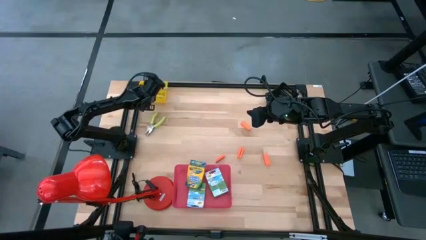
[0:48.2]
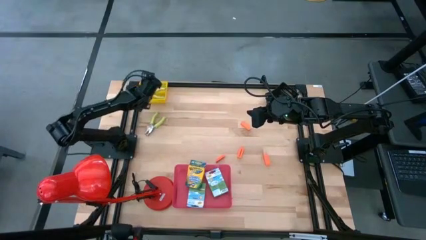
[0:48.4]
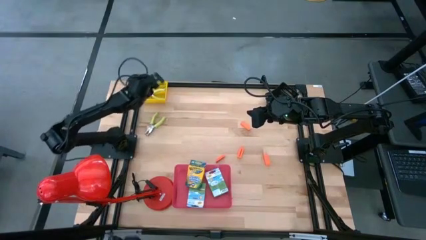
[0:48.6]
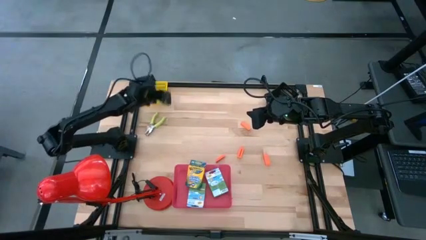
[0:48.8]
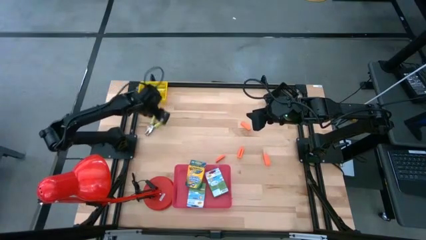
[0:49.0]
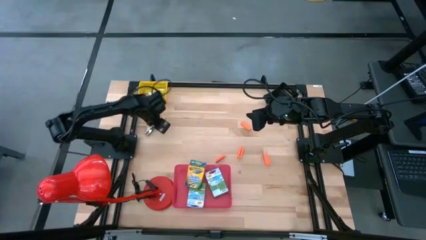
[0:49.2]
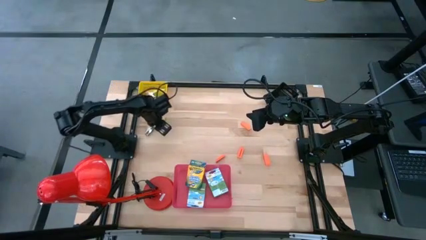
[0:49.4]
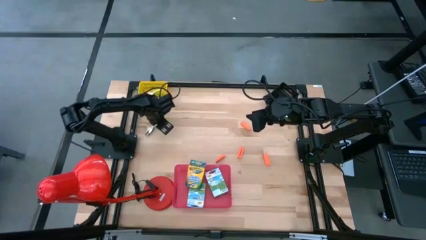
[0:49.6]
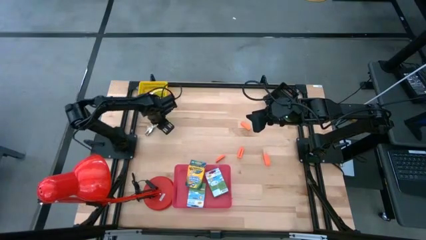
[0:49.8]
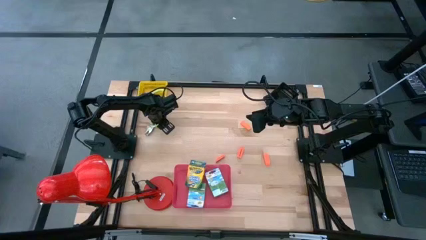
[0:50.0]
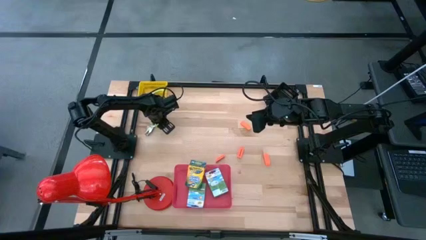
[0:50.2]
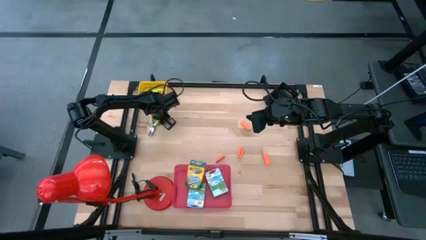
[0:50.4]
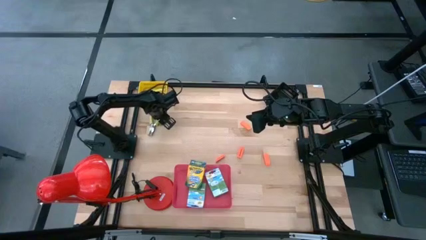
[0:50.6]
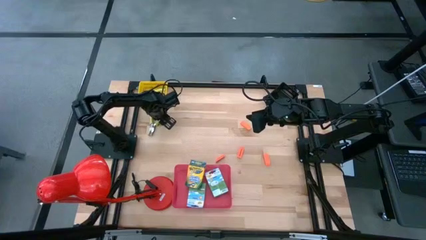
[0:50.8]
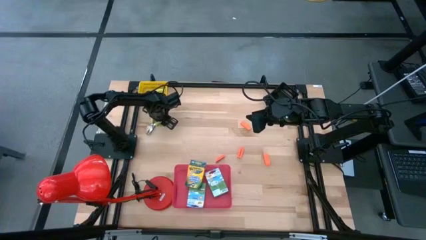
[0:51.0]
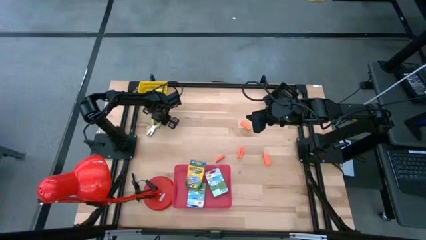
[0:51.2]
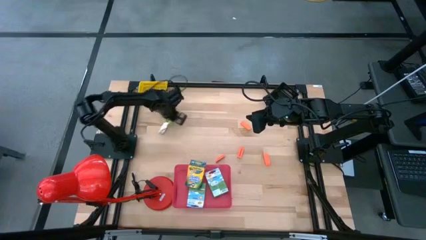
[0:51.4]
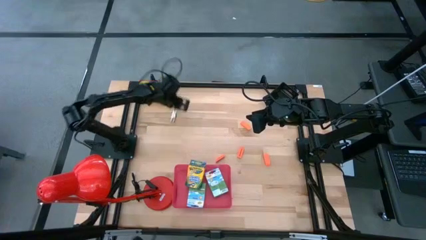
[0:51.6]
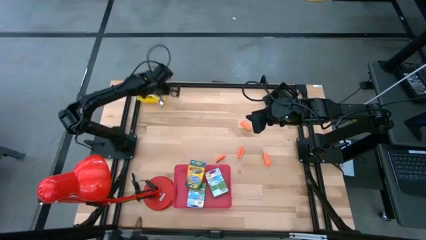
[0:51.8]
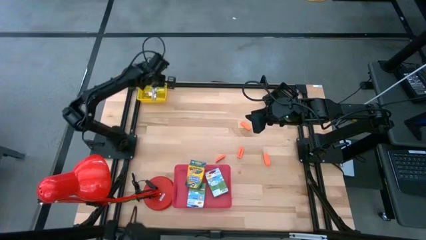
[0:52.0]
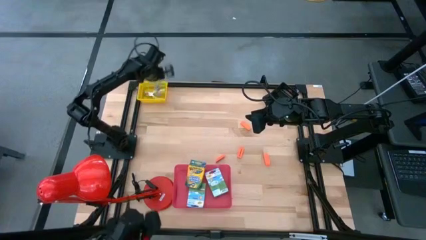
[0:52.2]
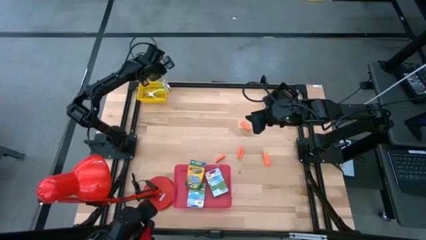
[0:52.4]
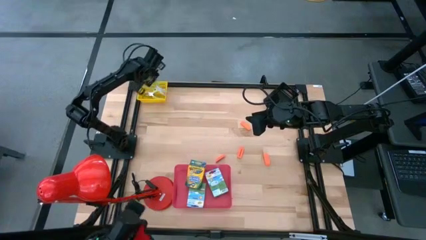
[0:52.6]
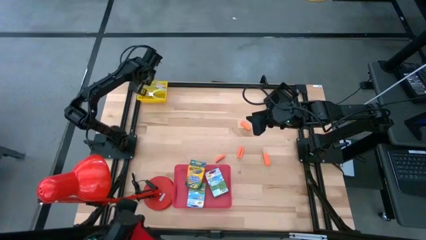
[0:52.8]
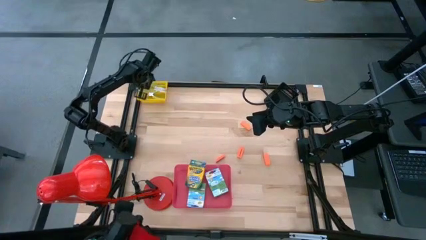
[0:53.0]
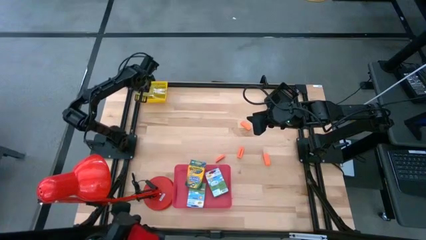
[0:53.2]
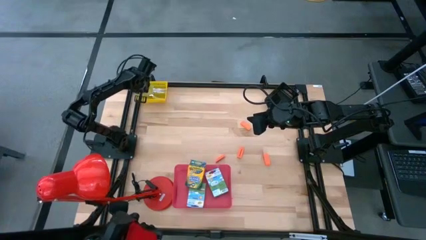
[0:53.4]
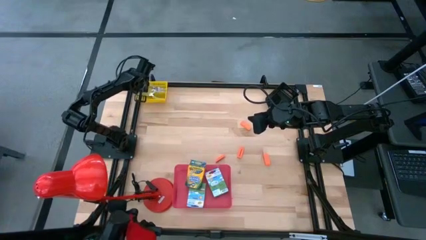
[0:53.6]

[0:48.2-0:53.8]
Task: Pick & Place School Supplies
Put the green puncher into the yellow bin

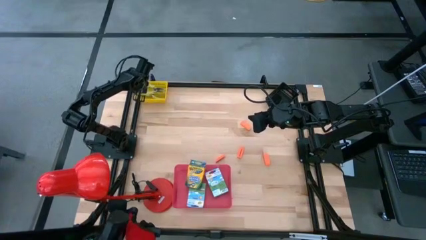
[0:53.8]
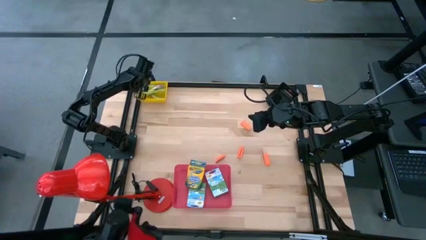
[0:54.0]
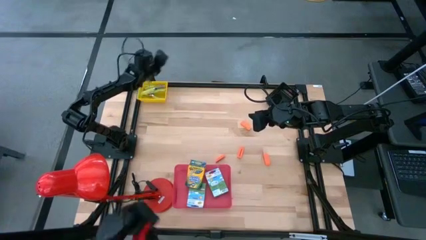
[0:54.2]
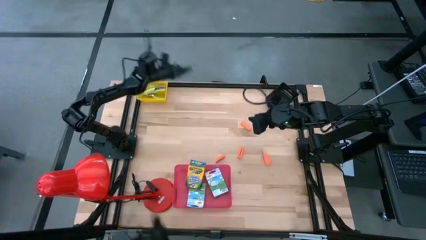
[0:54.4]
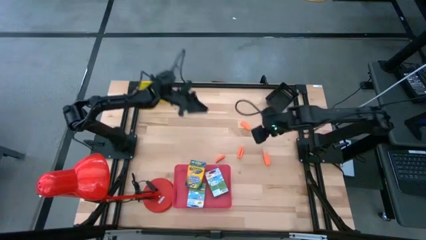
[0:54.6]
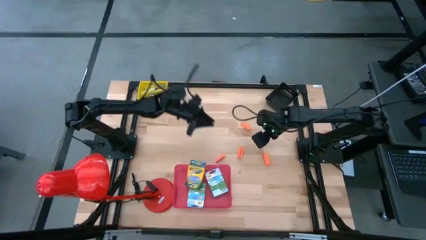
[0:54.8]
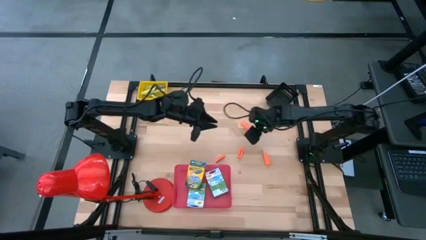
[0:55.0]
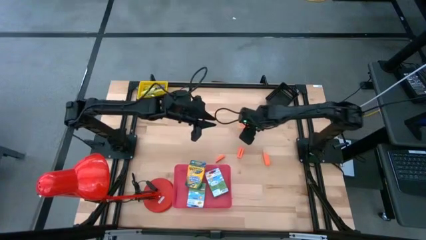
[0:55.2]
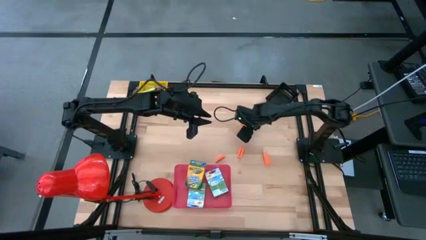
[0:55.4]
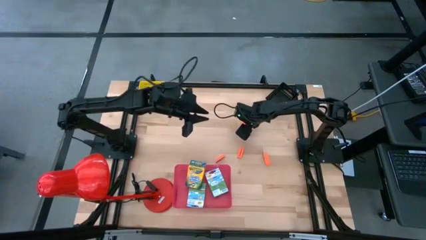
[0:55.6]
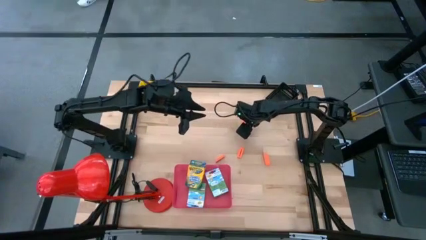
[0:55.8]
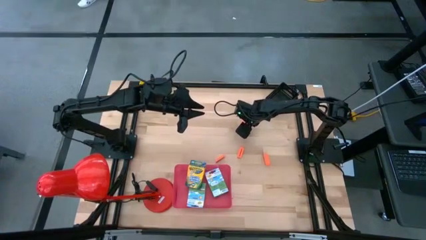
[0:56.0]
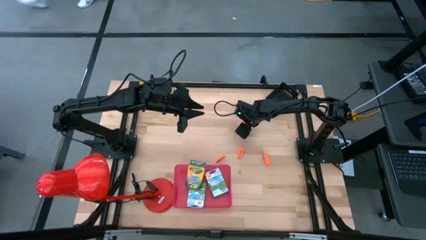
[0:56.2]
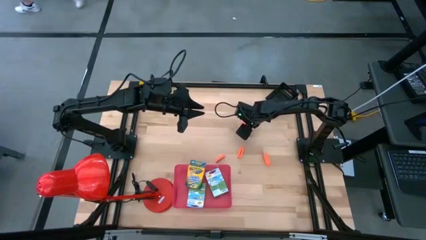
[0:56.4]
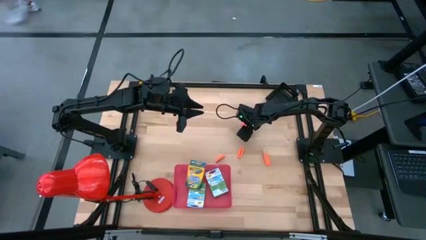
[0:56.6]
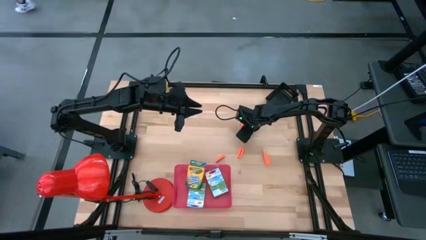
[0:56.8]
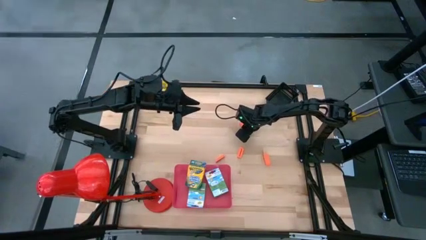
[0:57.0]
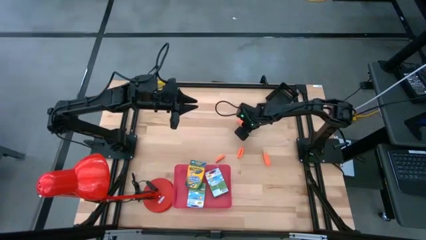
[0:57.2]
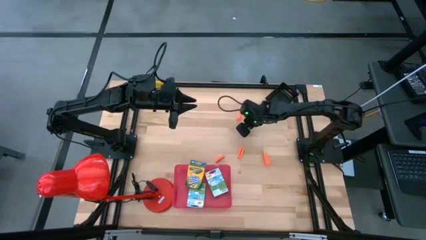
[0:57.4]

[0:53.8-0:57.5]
Put the orange eraser into the black bin

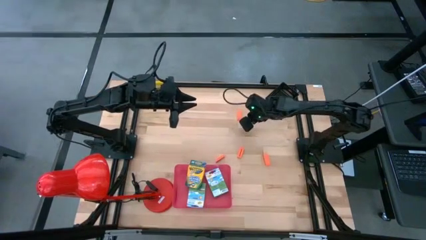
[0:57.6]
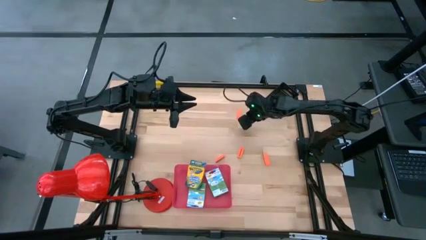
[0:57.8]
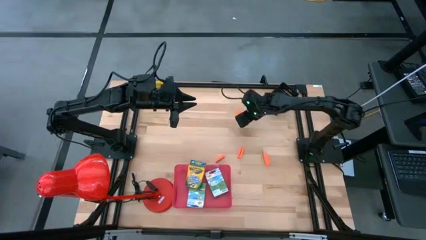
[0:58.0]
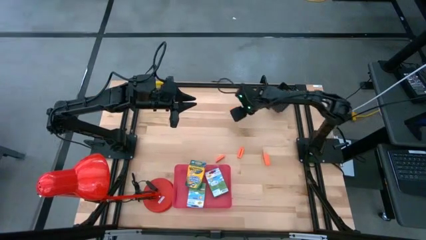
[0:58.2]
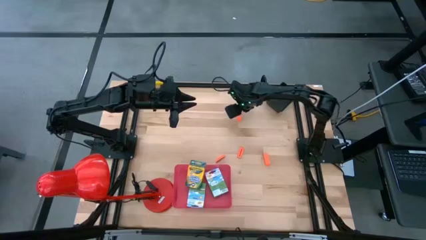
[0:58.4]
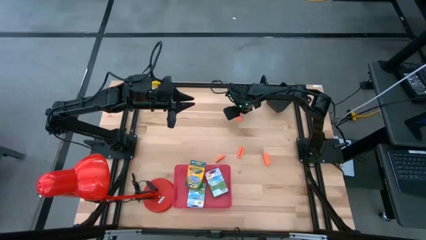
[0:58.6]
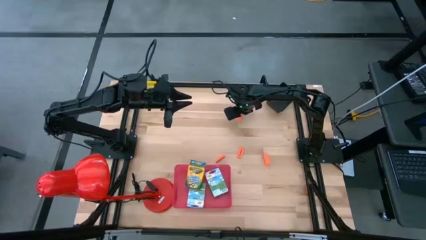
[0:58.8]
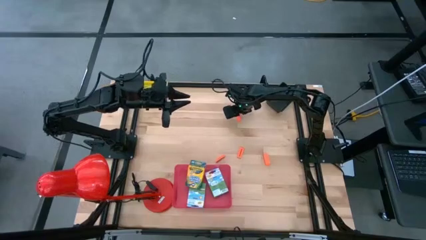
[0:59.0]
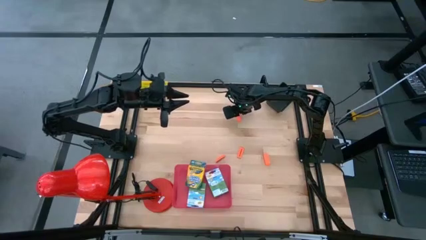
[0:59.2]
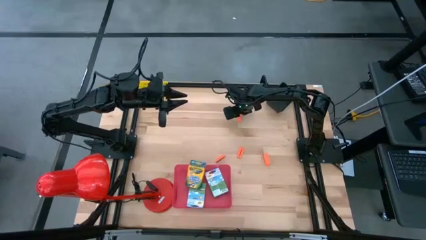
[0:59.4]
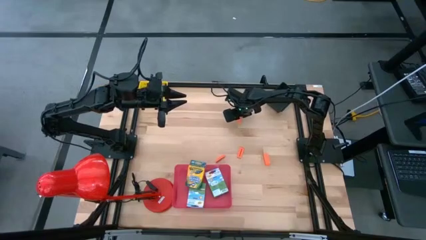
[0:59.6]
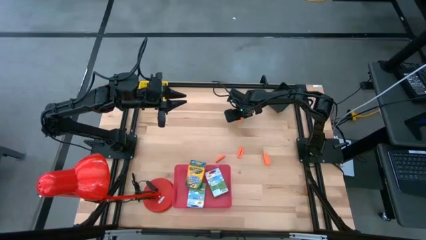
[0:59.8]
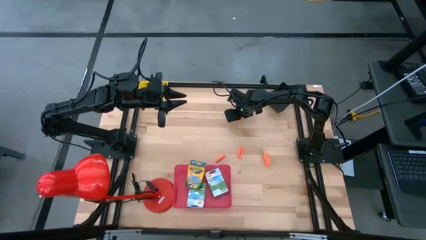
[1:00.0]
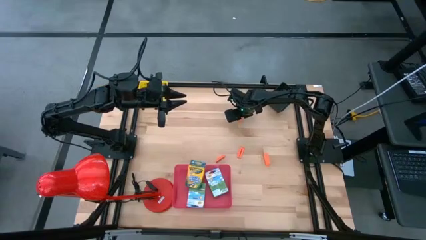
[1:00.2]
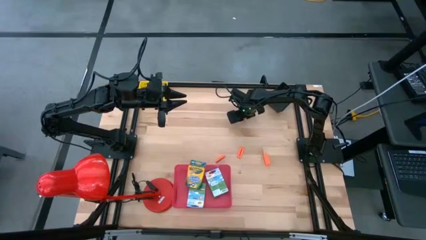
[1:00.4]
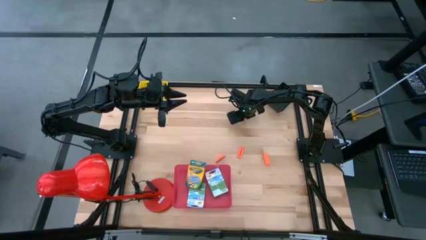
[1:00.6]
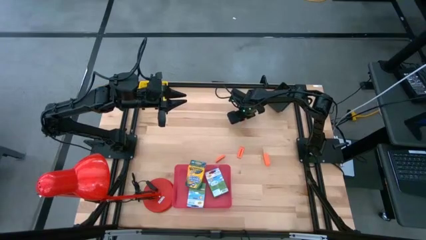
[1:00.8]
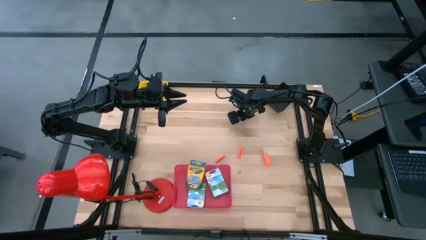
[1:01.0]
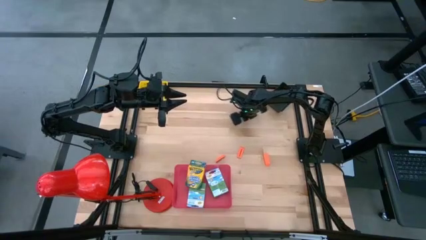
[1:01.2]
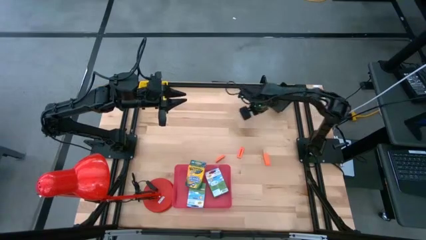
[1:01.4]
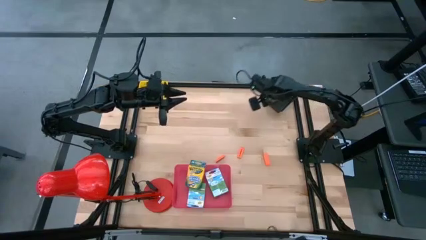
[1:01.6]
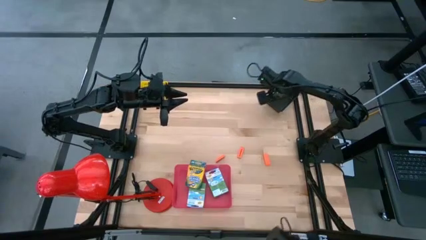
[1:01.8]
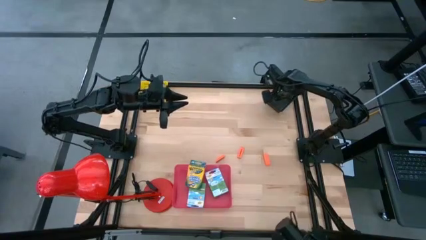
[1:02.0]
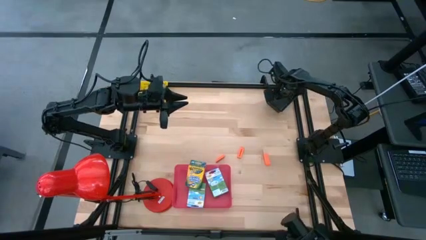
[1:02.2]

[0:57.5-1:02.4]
Put the orange eraser into the black bin

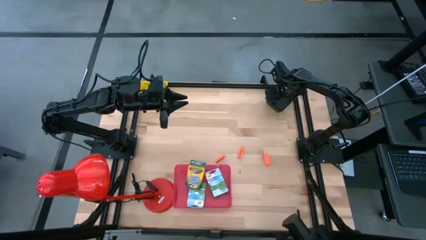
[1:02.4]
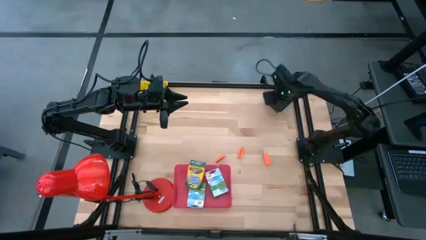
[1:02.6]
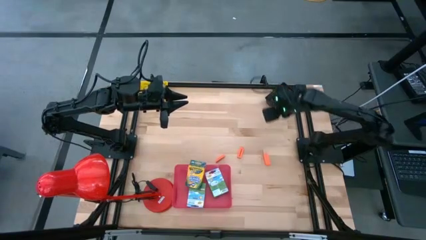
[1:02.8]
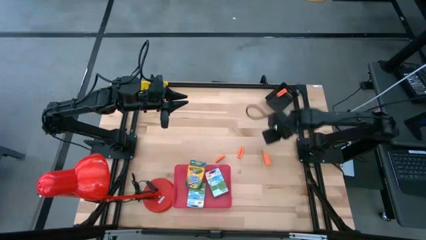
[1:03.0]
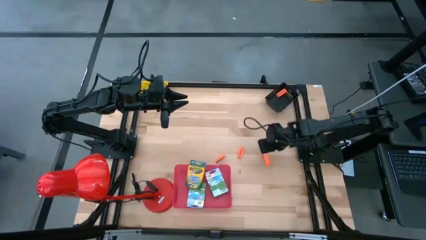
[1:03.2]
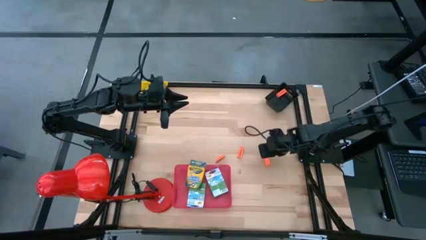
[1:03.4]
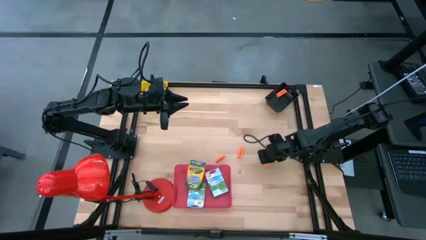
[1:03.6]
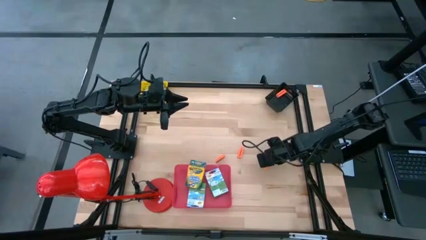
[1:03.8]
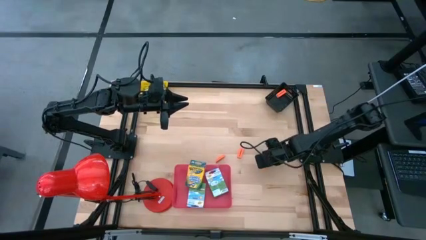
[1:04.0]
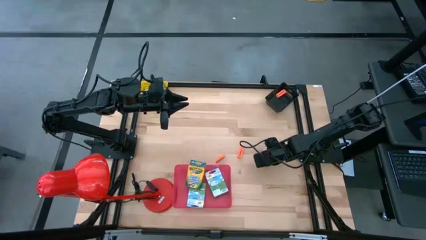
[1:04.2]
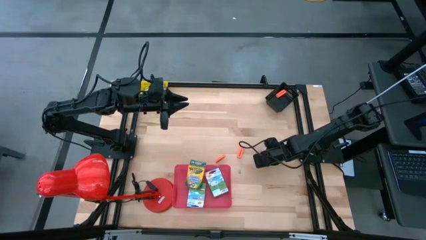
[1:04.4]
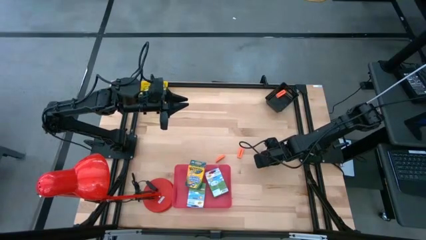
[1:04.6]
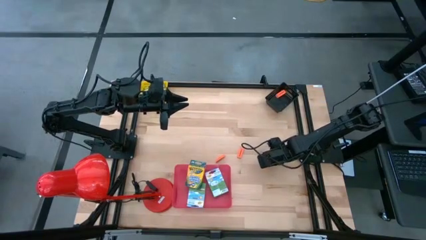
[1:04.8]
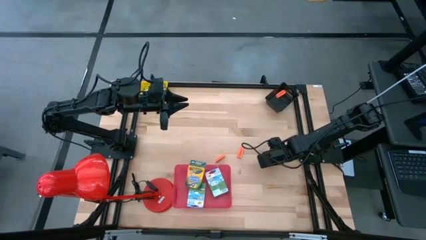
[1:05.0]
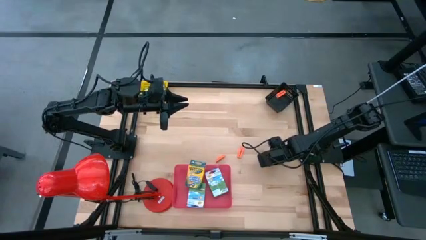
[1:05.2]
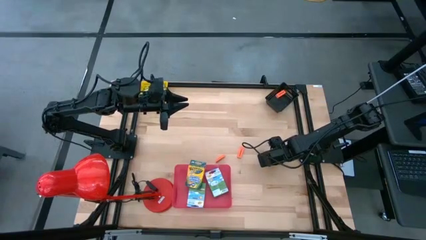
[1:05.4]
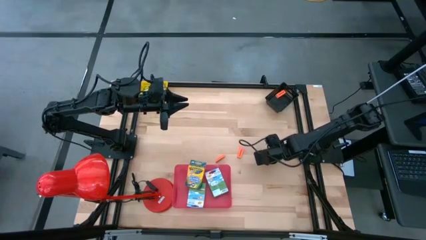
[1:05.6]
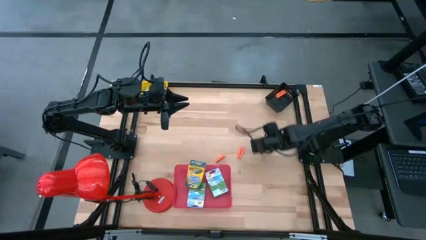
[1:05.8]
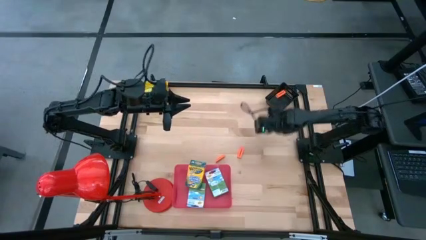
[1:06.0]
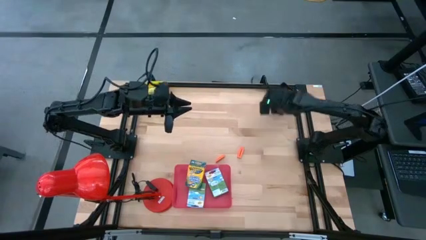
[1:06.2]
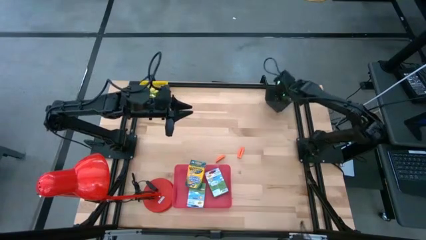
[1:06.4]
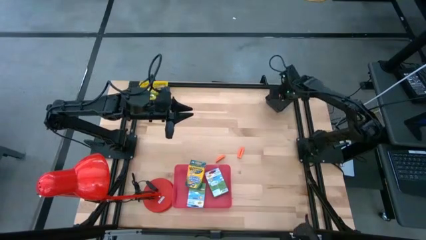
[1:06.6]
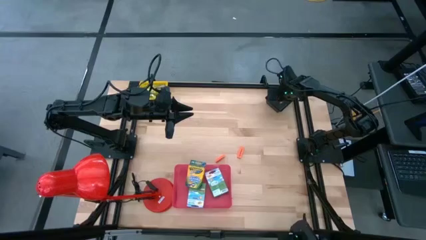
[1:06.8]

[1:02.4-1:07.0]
Put the orange eraser into the black bin
